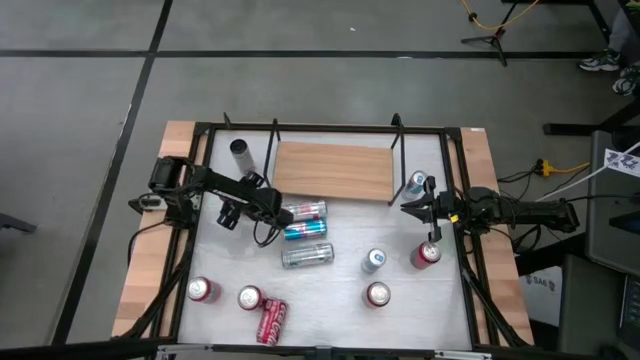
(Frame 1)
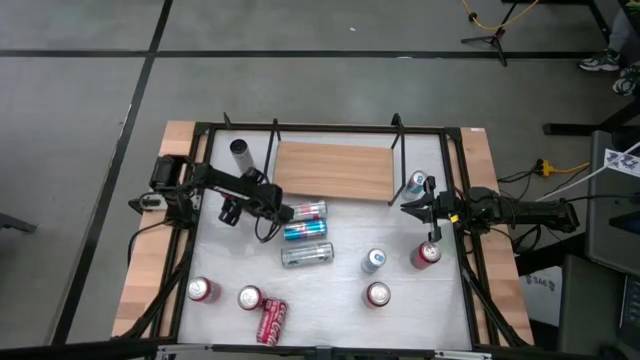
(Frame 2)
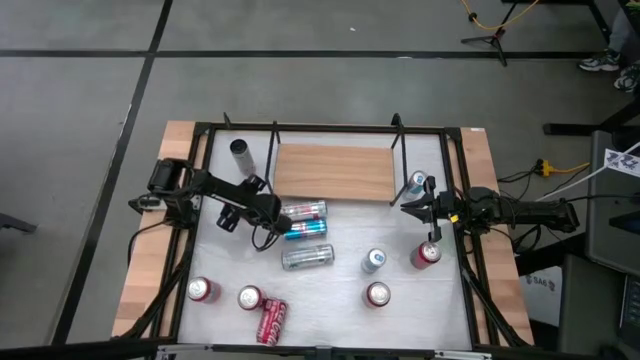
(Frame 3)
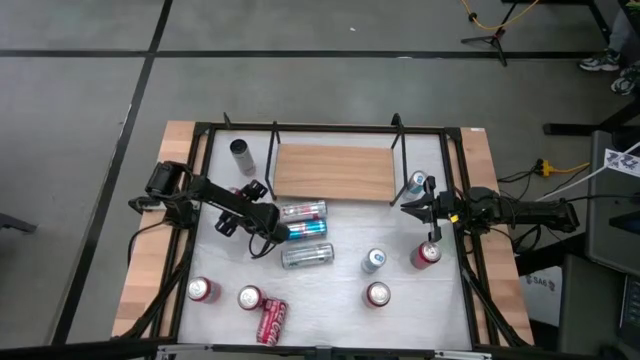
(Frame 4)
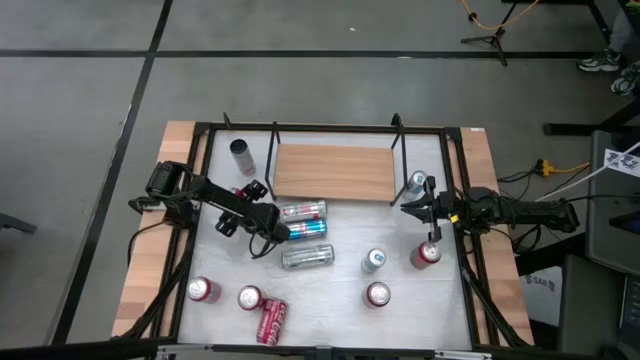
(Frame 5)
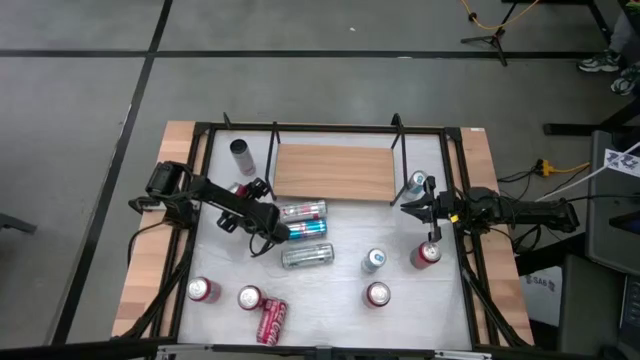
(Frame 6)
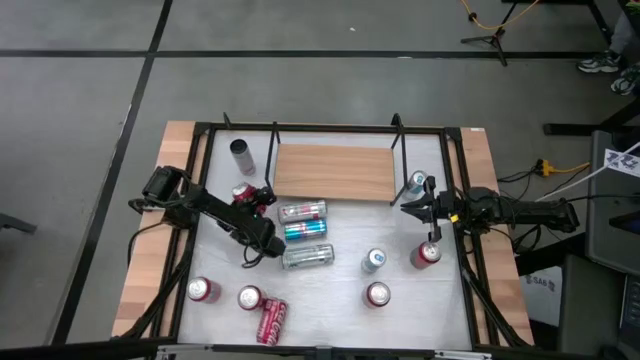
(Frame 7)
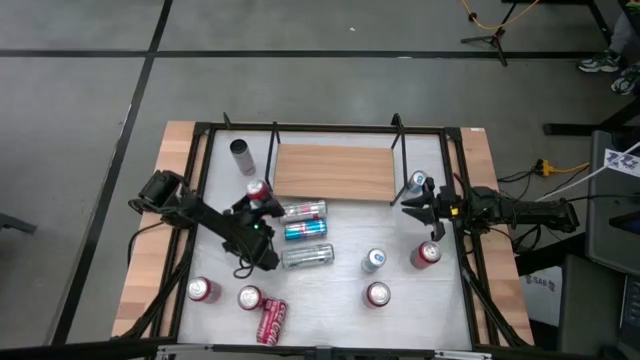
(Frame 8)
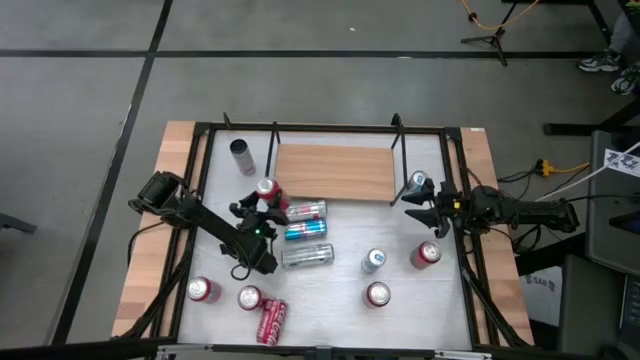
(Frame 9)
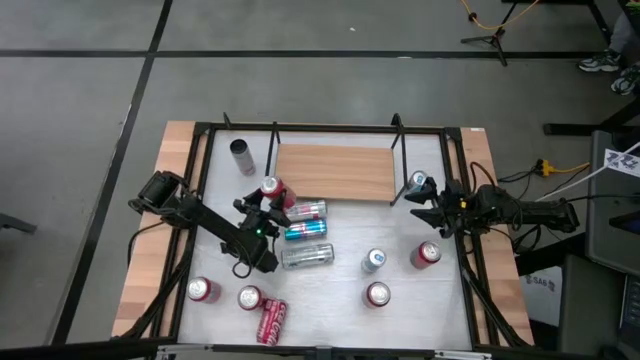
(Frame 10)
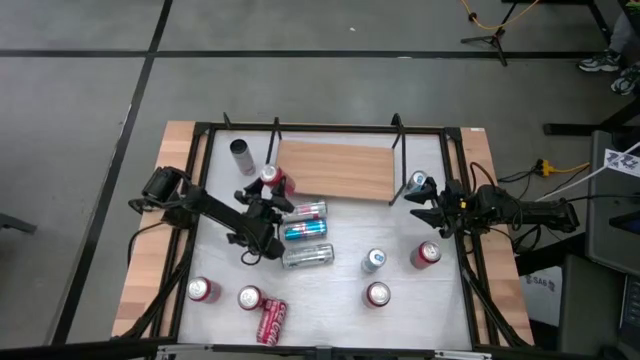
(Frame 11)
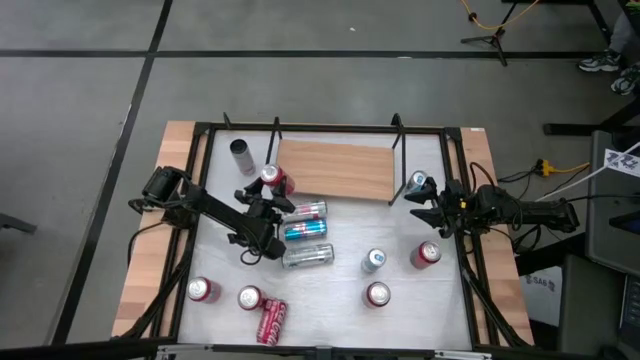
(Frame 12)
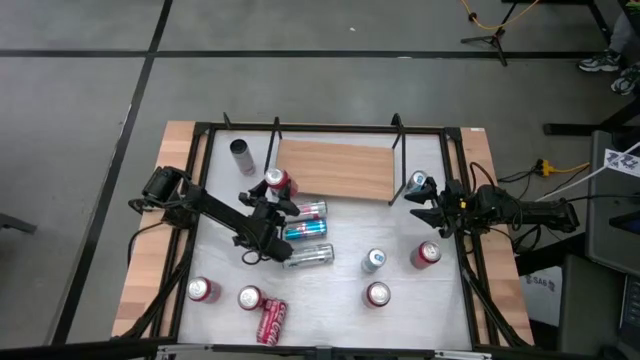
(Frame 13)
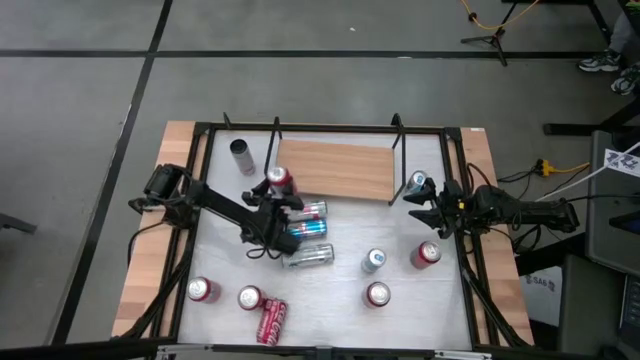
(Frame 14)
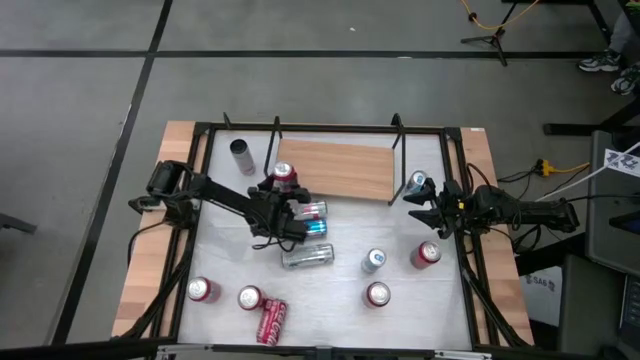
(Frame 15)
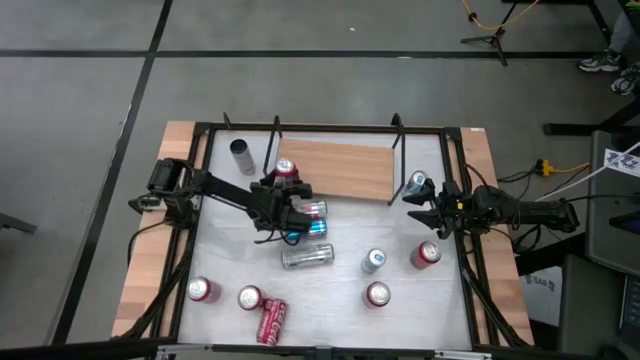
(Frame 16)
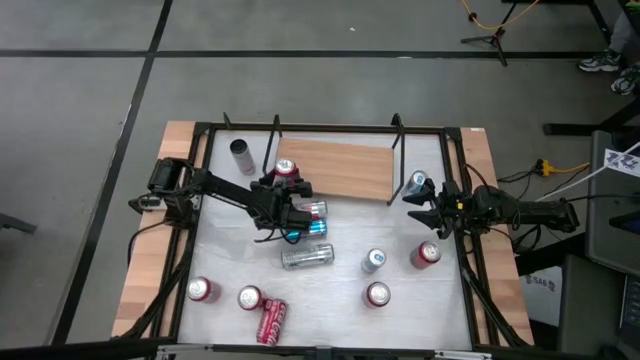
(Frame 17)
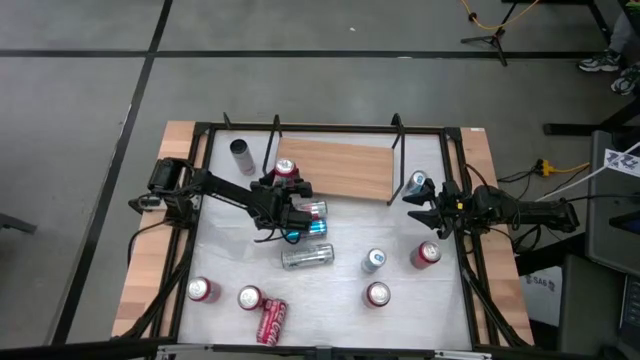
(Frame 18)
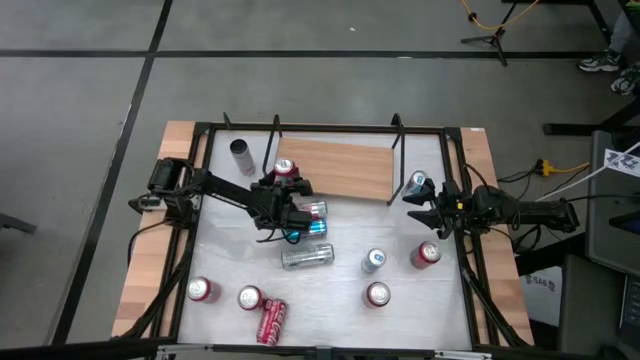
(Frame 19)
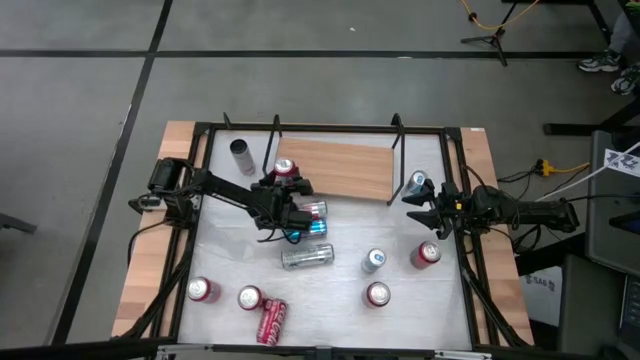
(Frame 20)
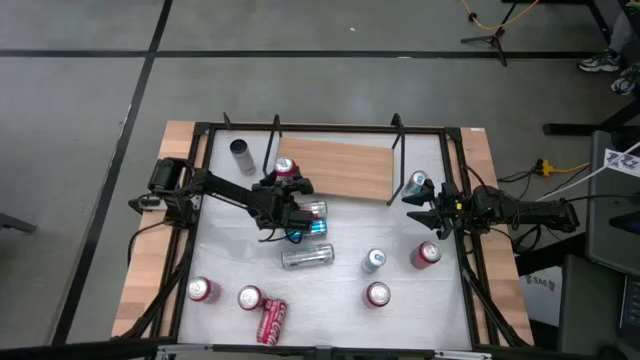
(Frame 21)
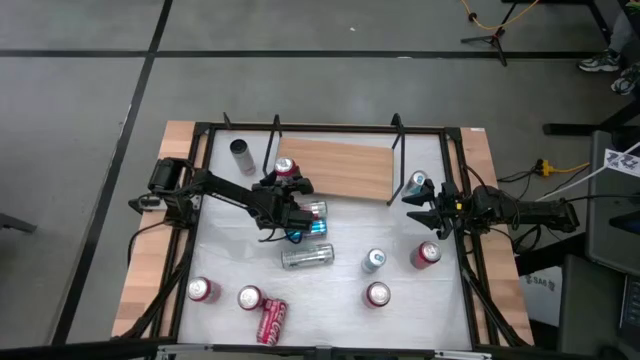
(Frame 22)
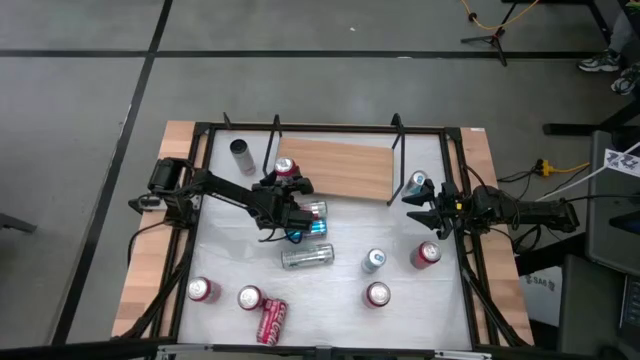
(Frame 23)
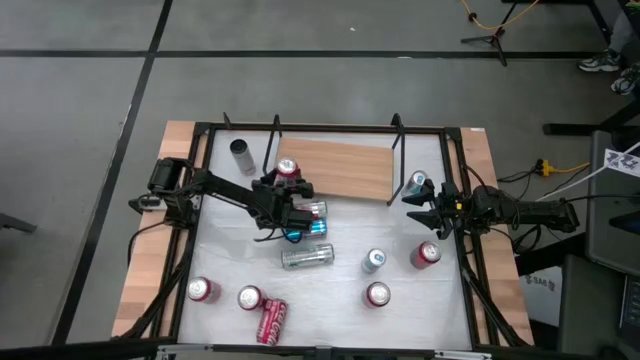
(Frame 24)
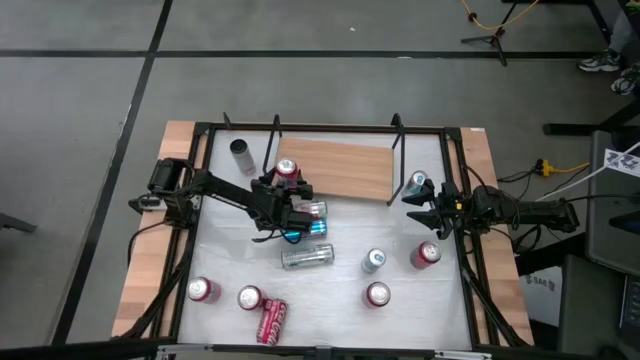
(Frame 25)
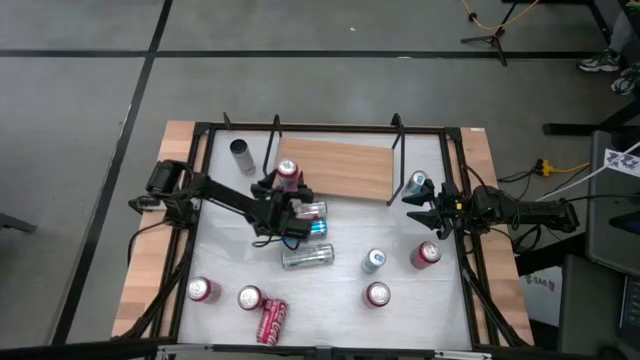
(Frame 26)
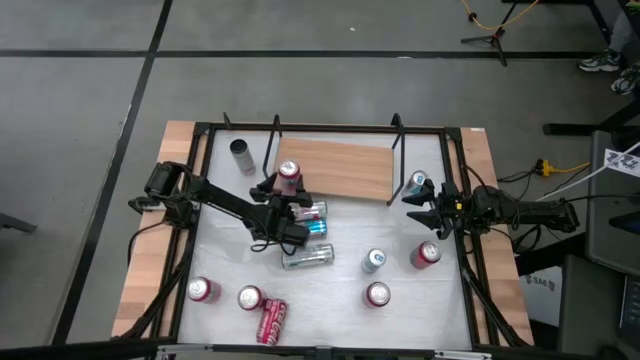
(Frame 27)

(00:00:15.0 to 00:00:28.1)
Task: Place canned beverage on shelf
Put the top red soda can on the shelf

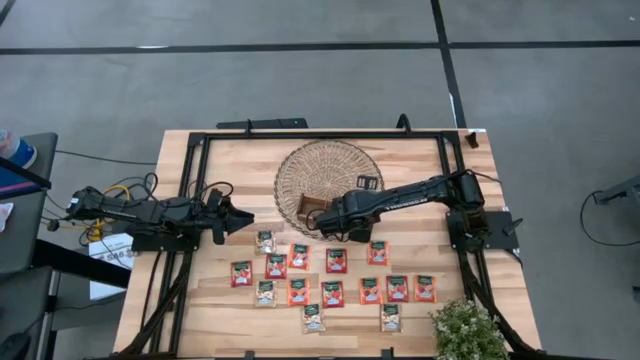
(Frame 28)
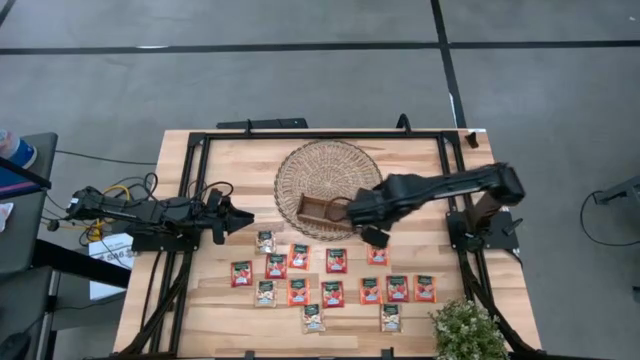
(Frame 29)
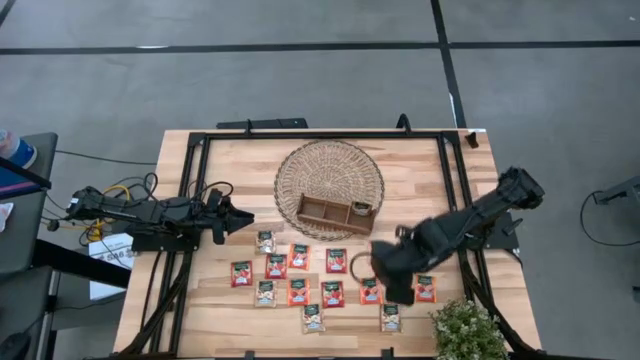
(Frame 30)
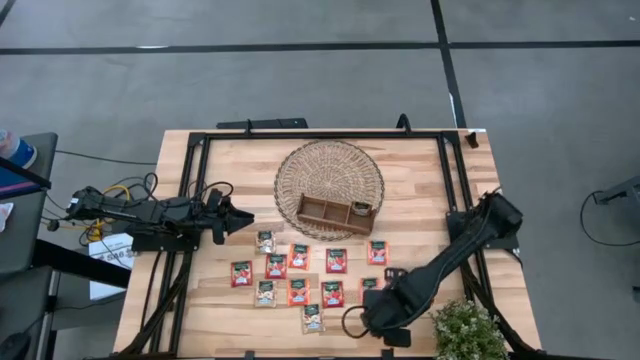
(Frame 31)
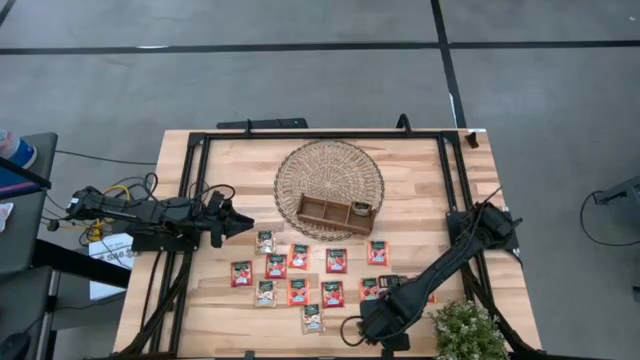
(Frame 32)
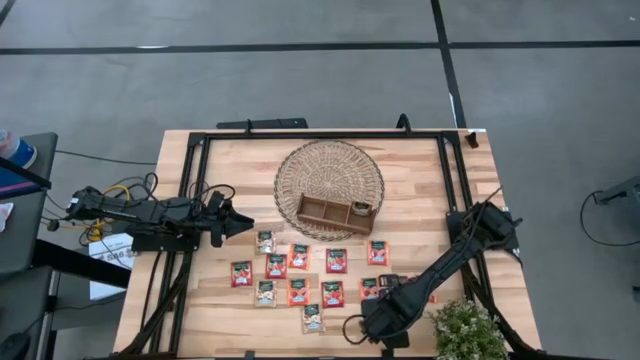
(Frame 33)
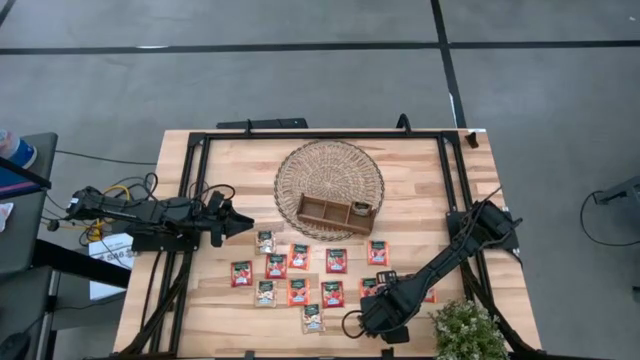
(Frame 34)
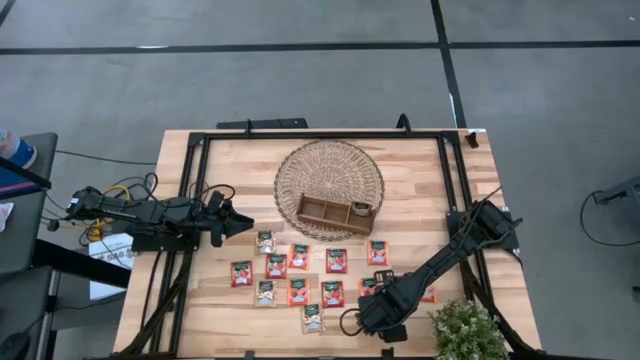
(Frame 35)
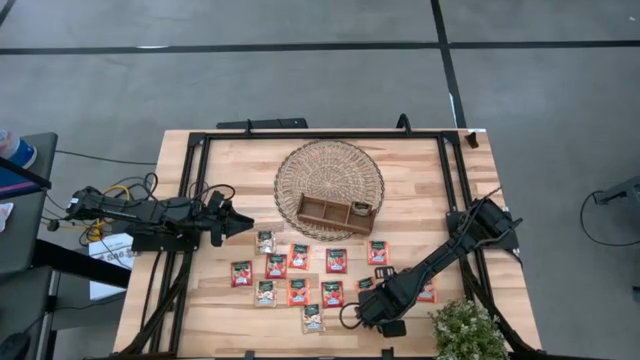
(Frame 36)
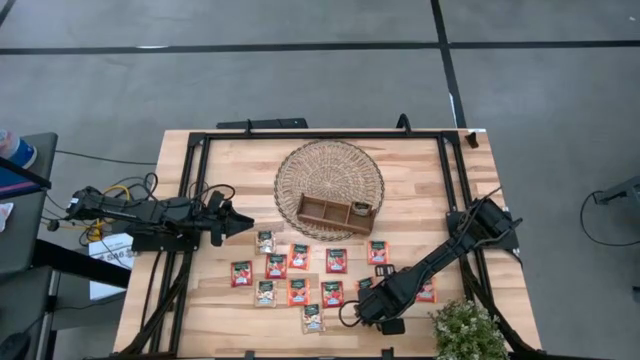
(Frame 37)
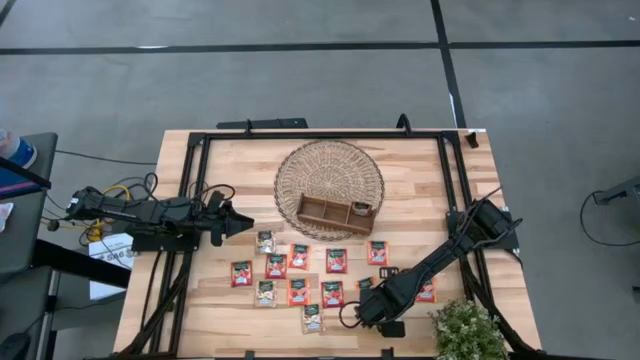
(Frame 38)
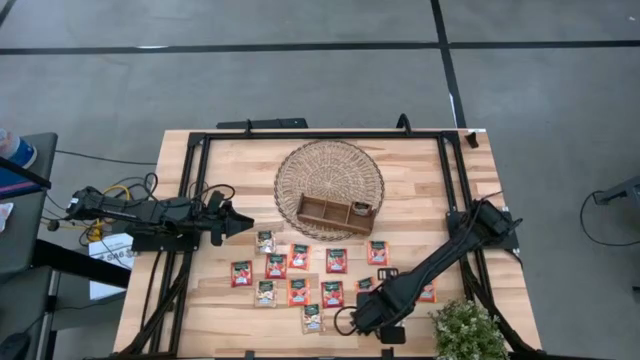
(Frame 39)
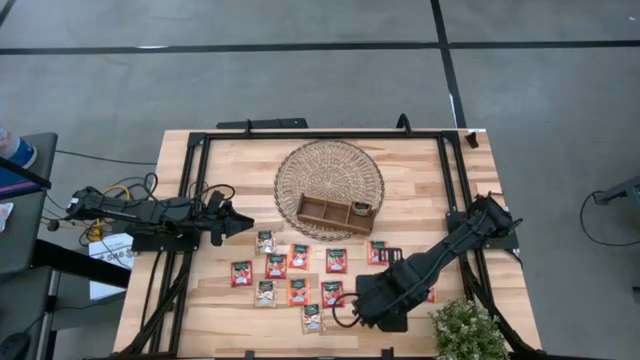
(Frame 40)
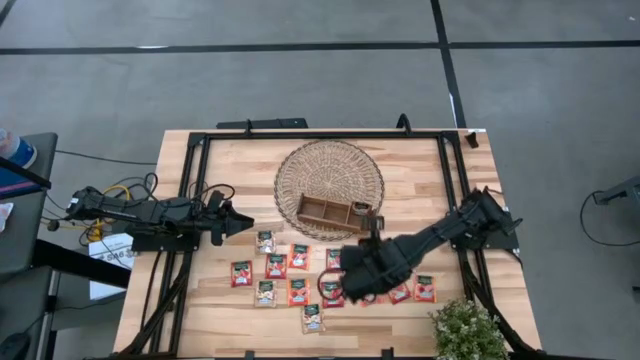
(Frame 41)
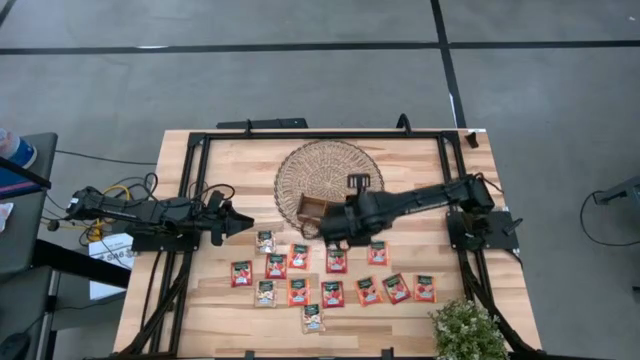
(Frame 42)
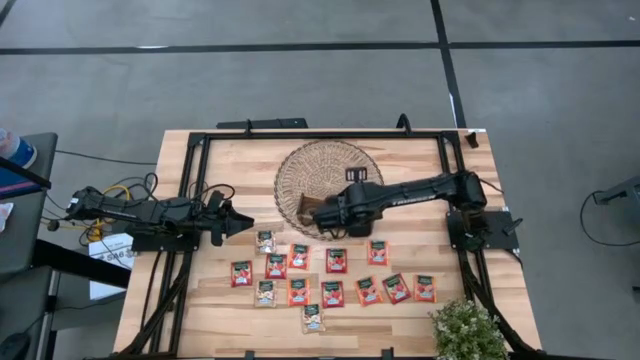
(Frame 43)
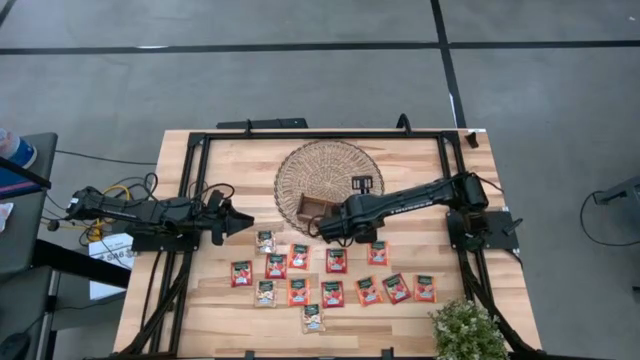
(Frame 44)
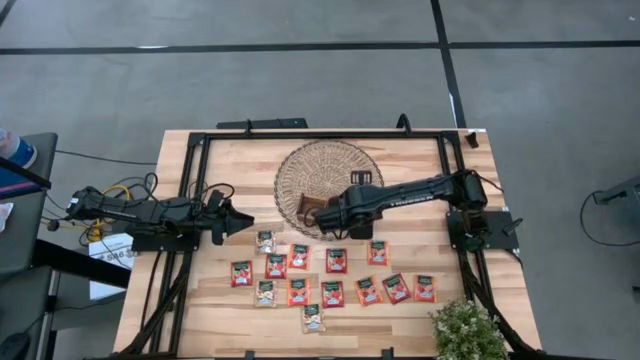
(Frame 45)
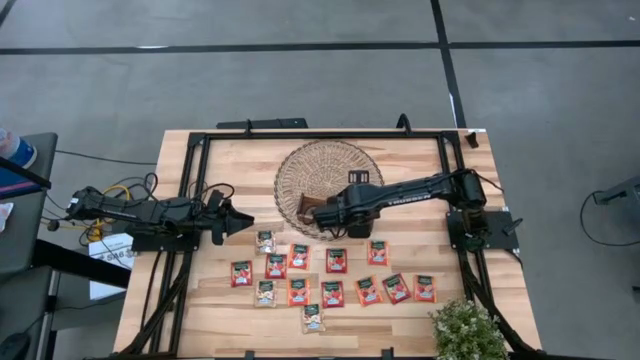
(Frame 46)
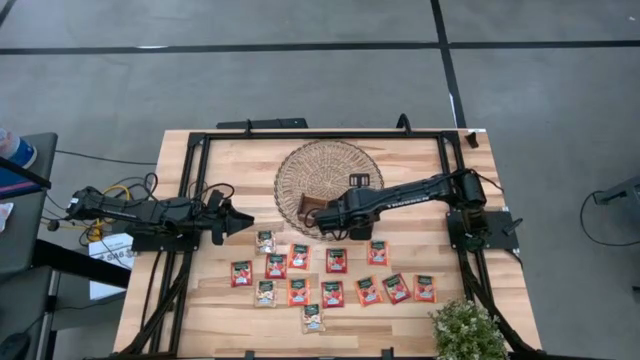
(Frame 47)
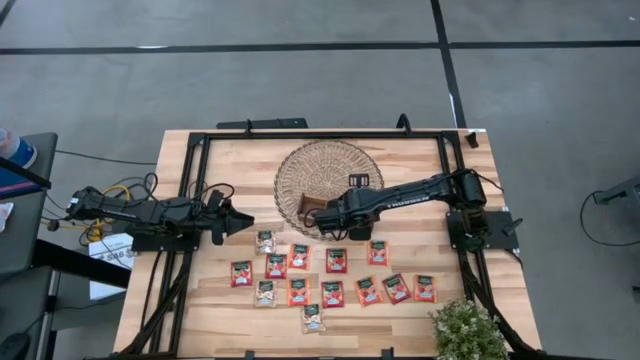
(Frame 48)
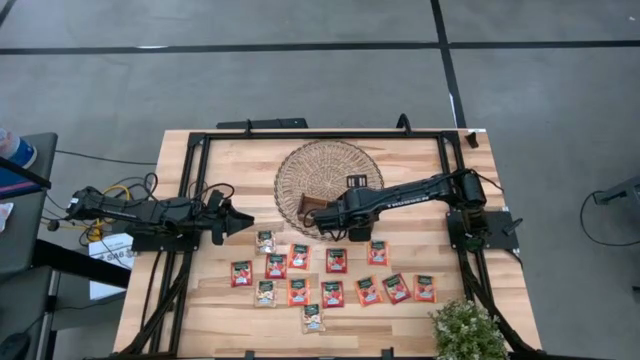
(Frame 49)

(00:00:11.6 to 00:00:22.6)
Task: Pick & Place Tea
Put the brown tea bag into the right section of the wooden organizer
